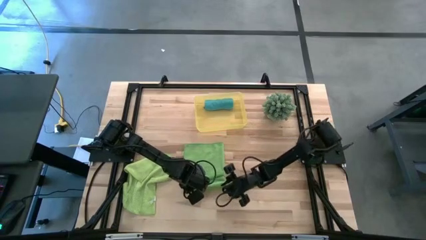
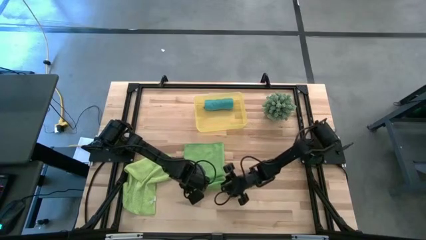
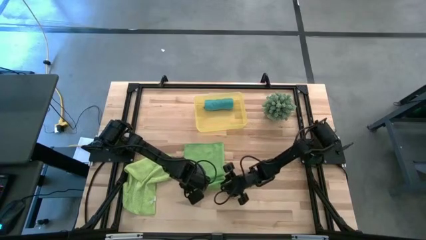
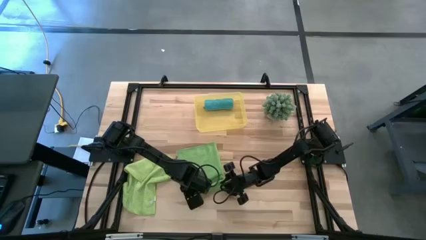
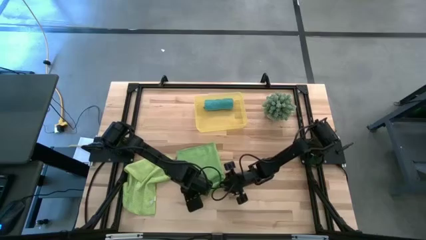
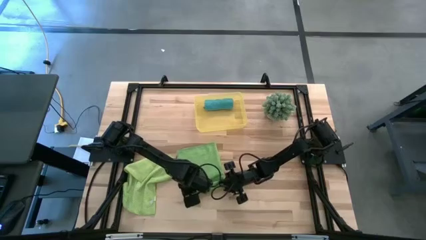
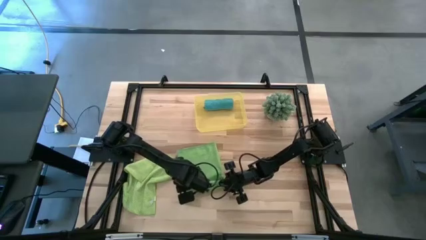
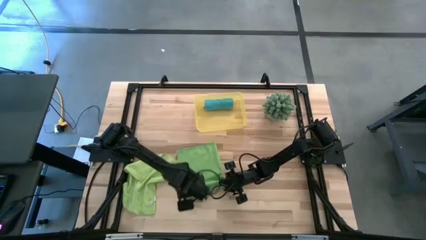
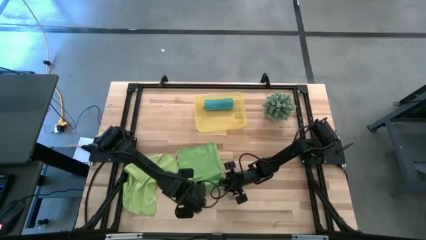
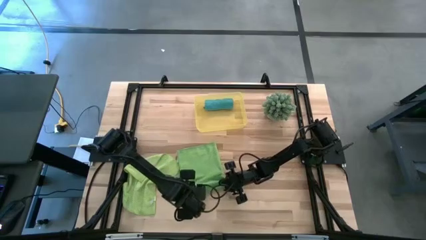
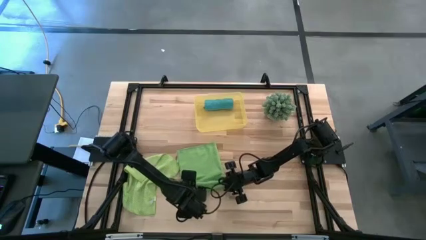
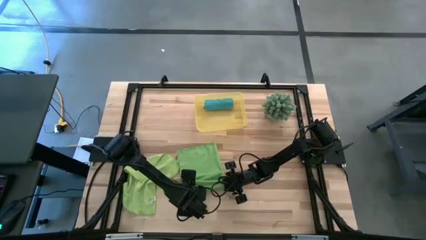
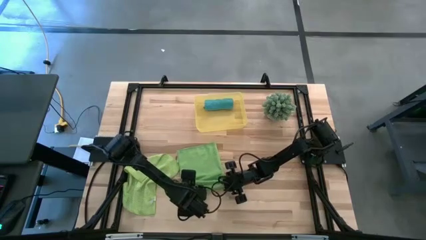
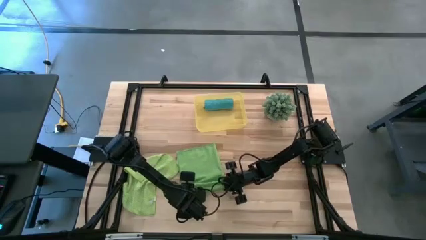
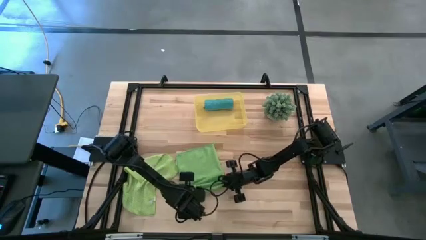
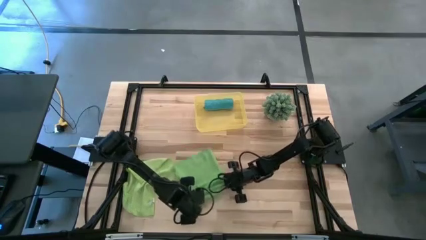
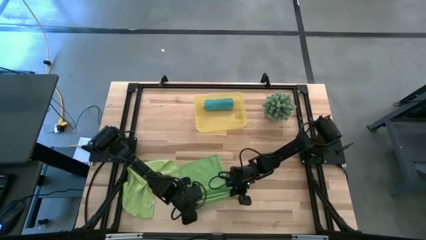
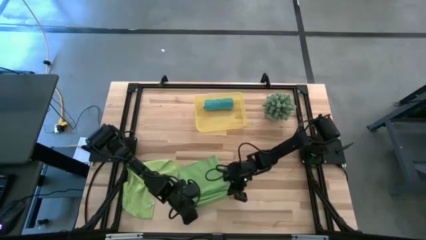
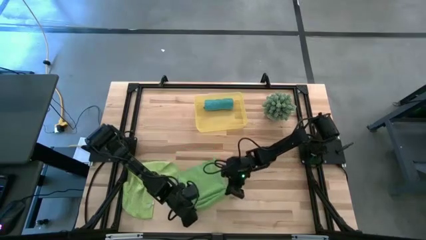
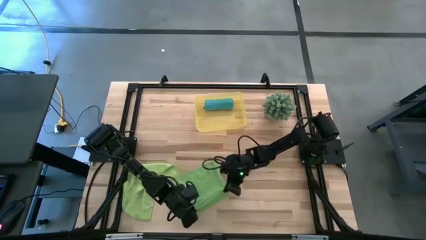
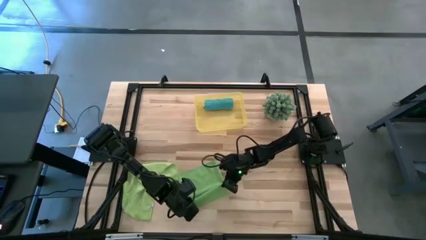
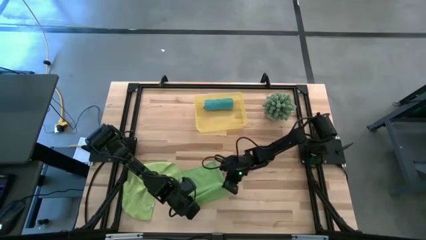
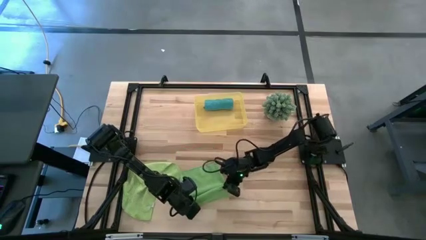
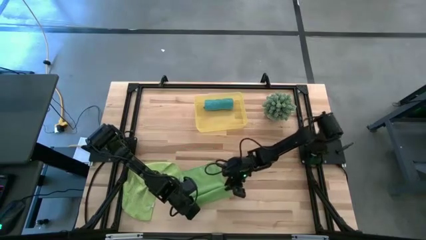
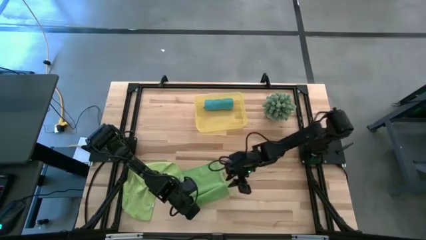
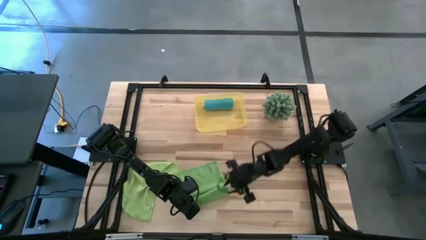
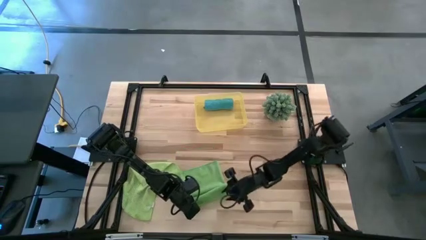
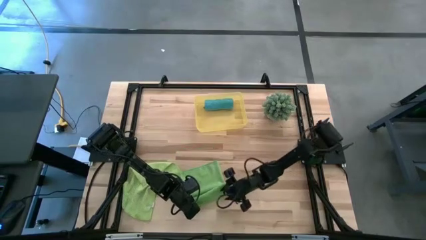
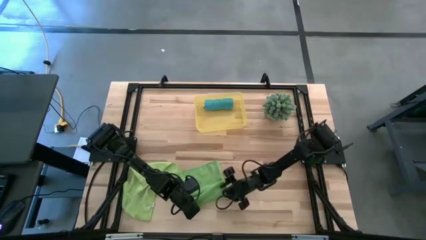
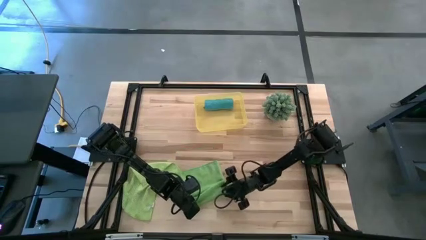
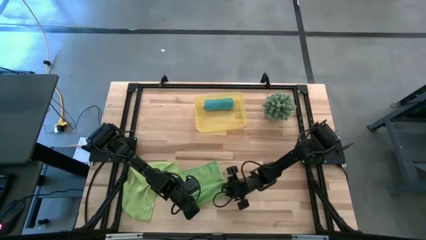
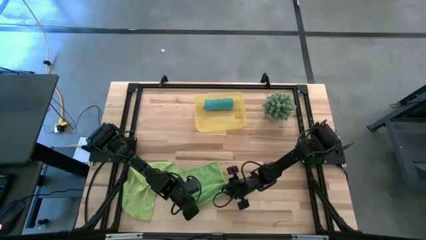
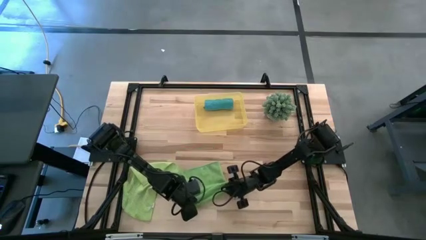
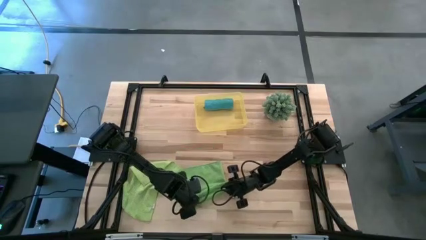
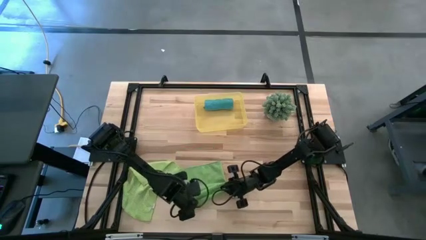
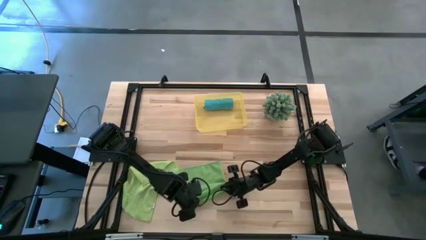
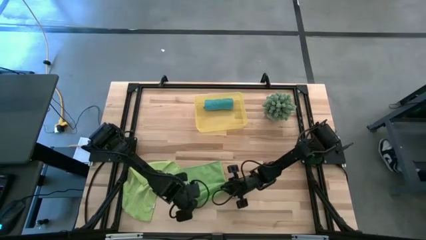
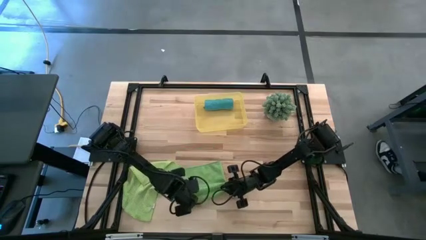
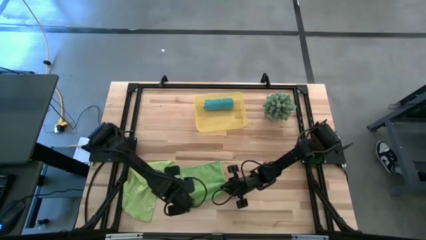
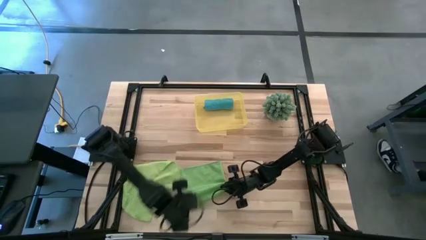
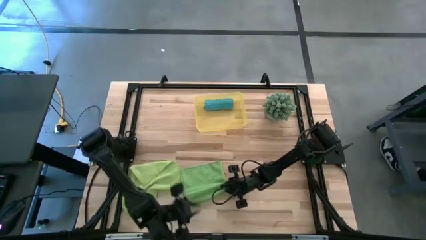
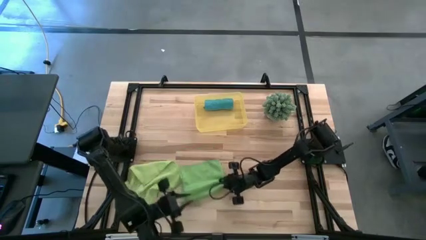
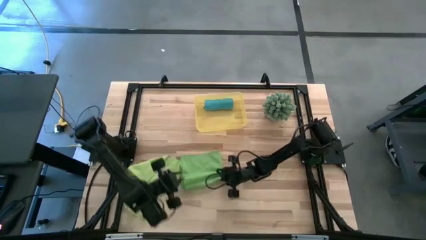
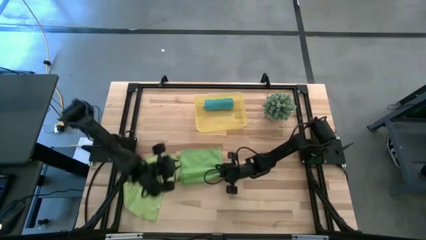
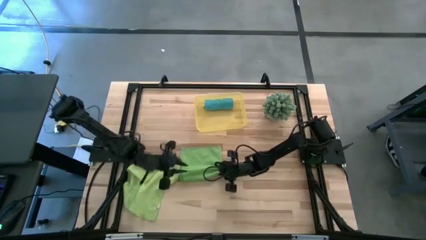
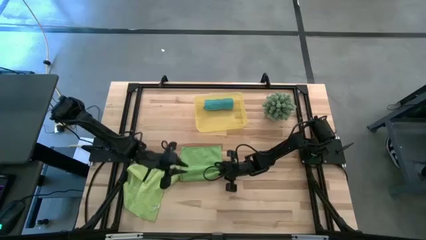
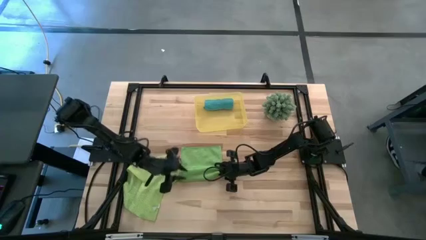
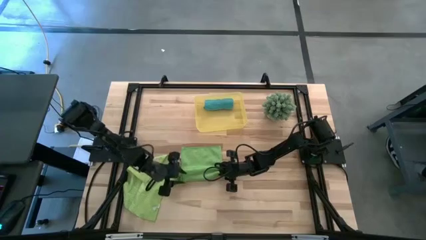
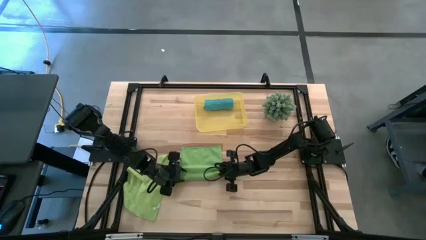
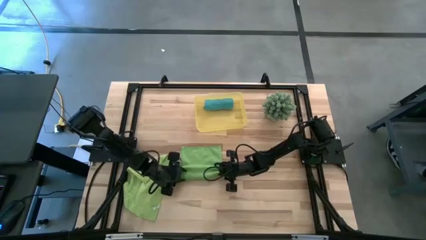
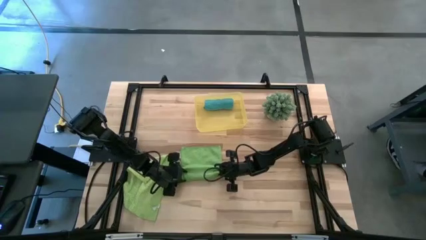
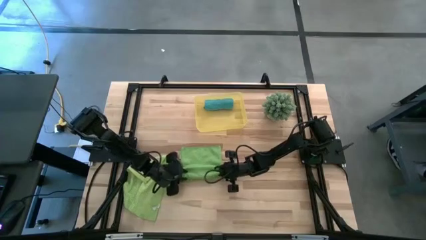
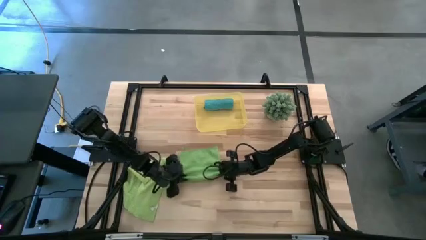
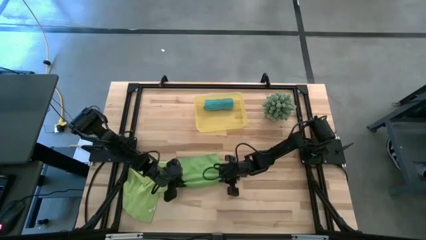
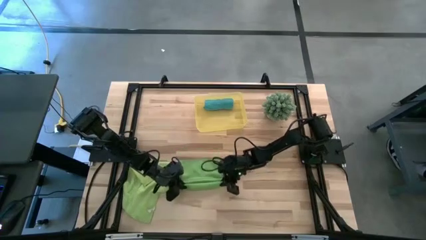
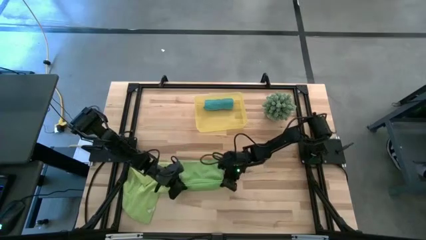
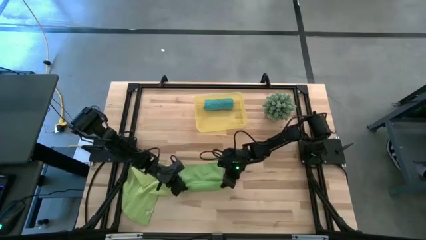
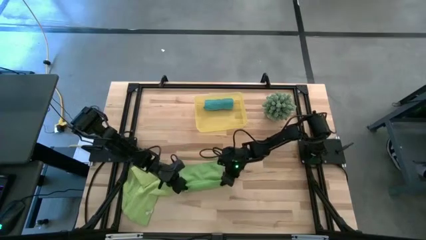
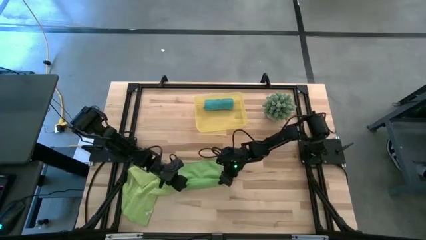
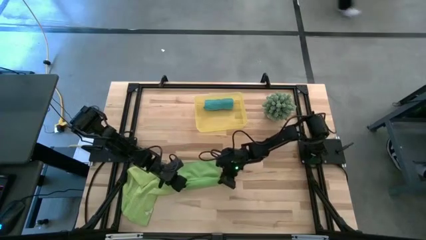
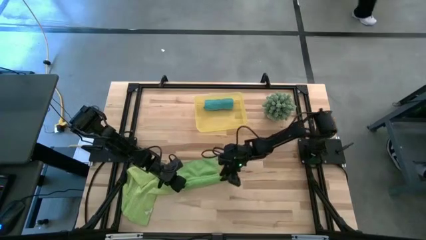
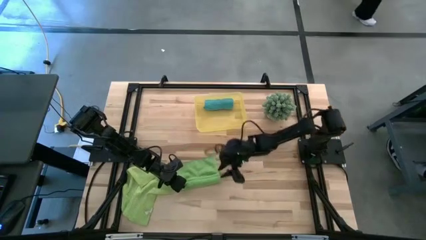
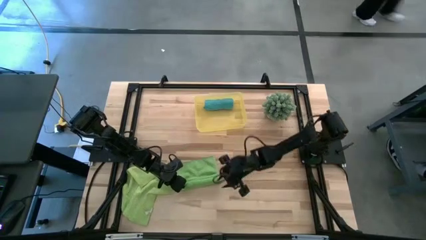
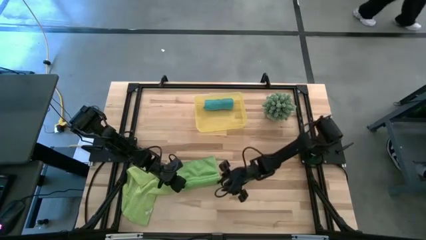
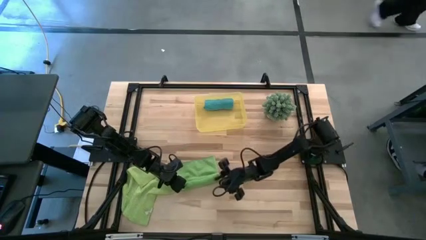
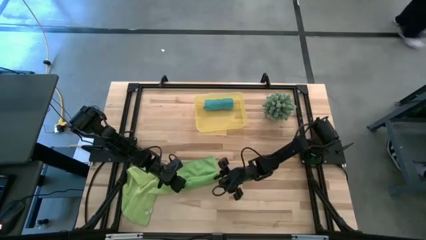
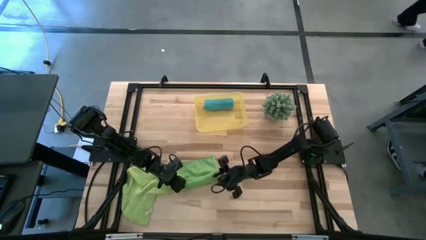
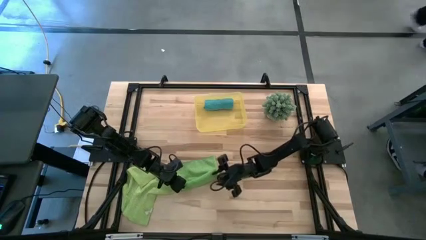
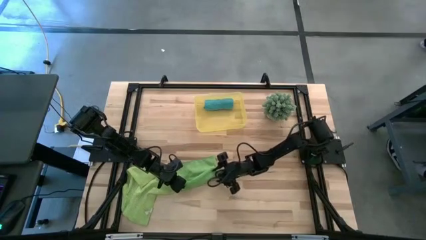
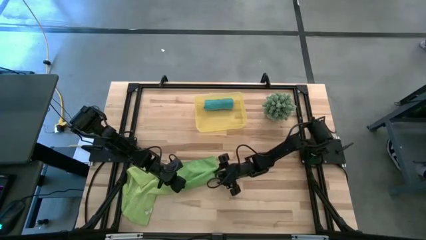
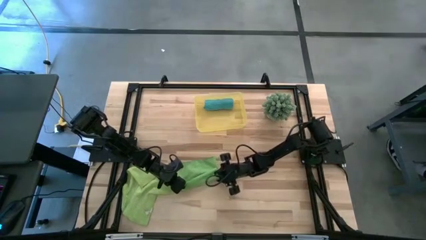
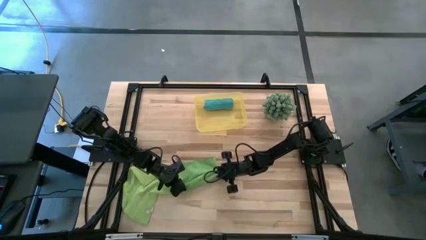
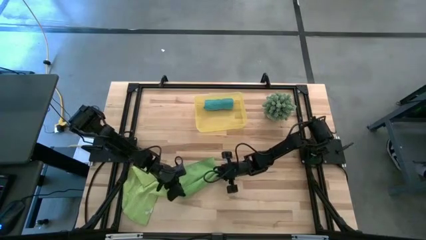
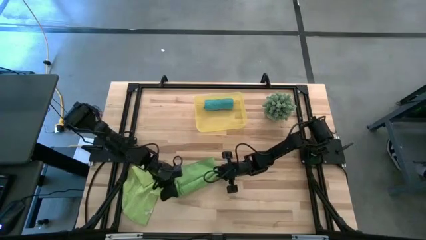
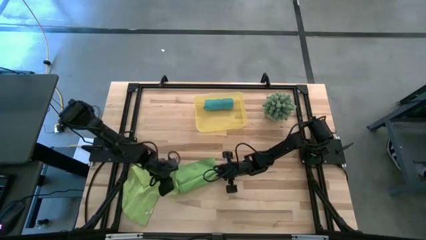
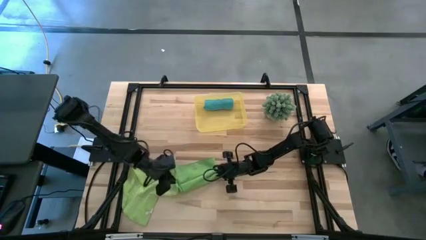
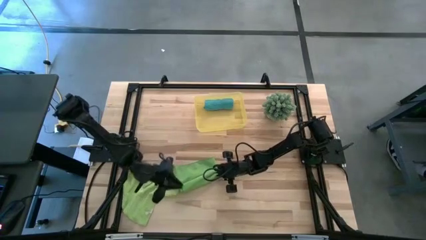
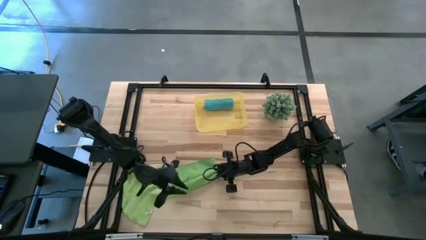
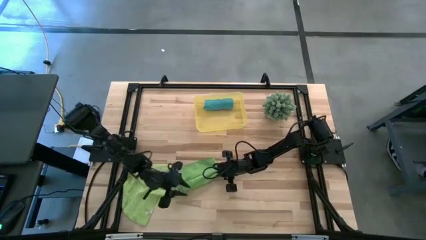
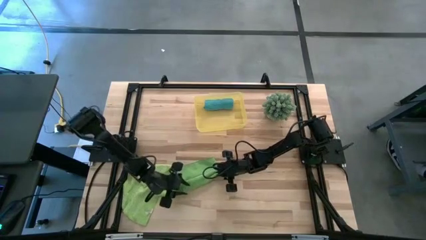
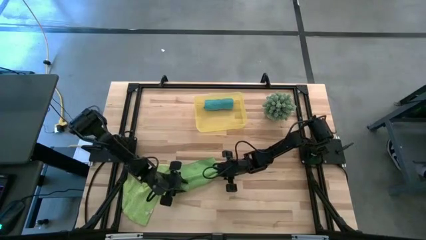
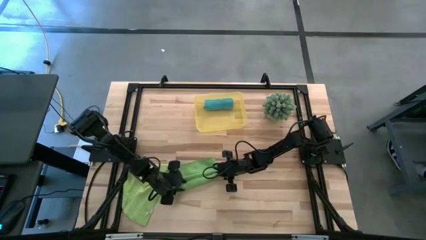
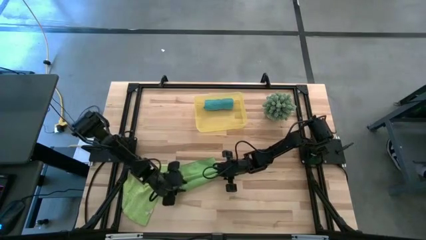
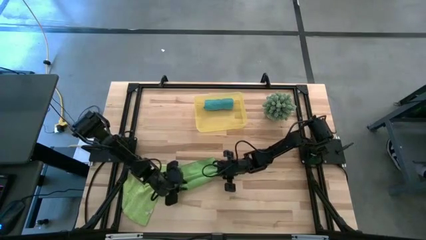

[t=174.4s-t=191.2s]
Task: Roll microfiber towels into tight, uniform cylinder then place into a basket
Roll the green microfiber cloth
